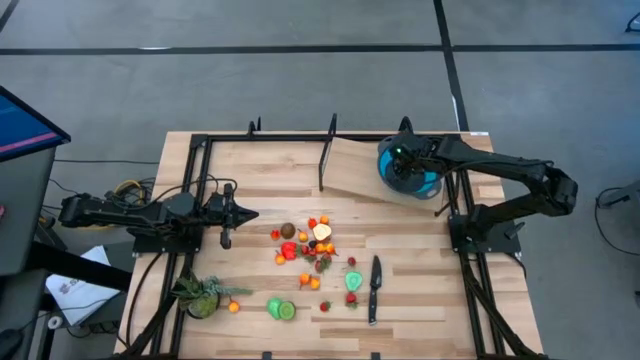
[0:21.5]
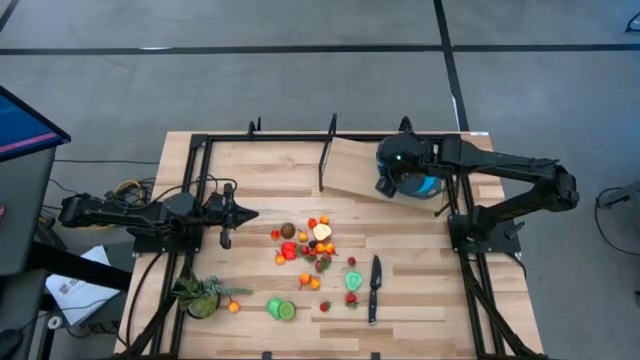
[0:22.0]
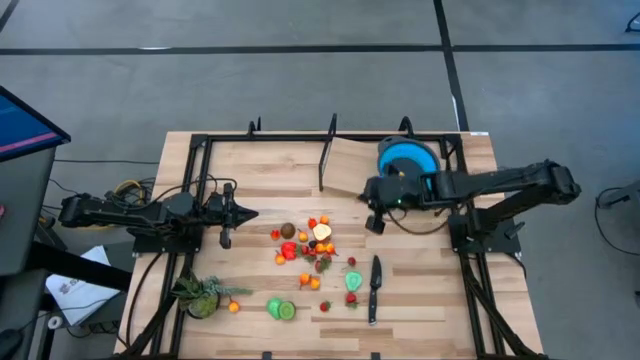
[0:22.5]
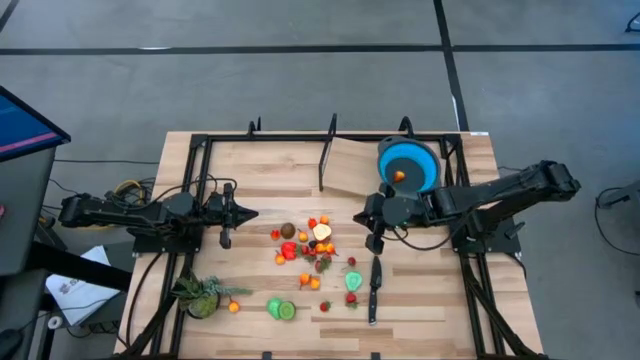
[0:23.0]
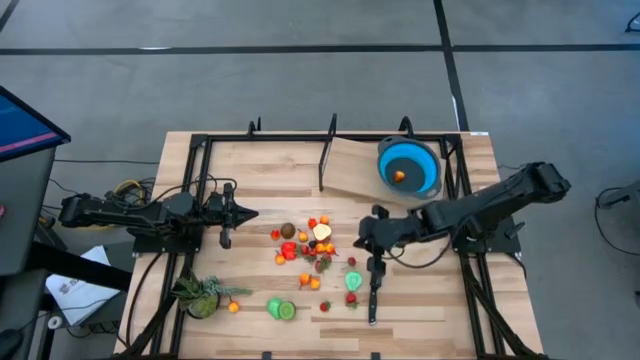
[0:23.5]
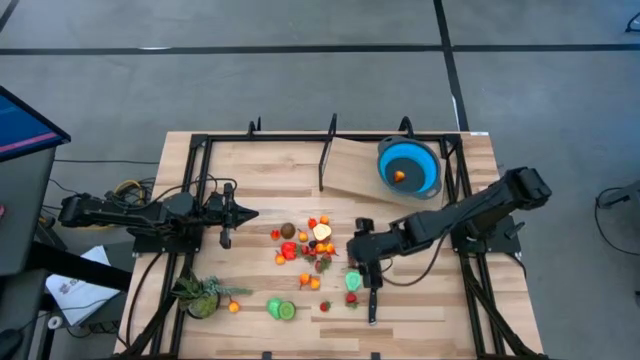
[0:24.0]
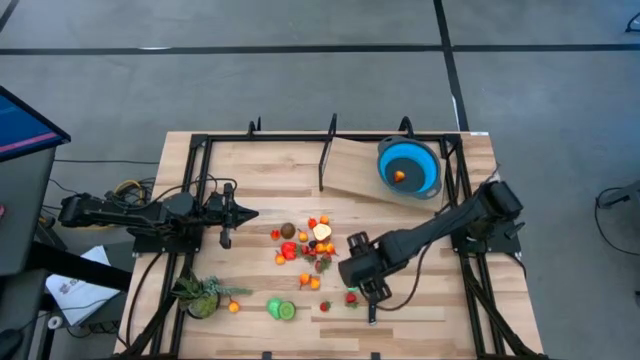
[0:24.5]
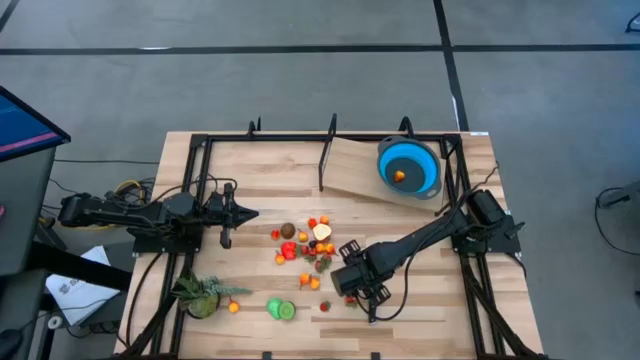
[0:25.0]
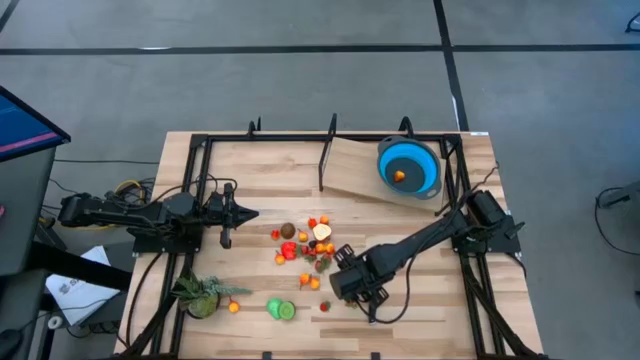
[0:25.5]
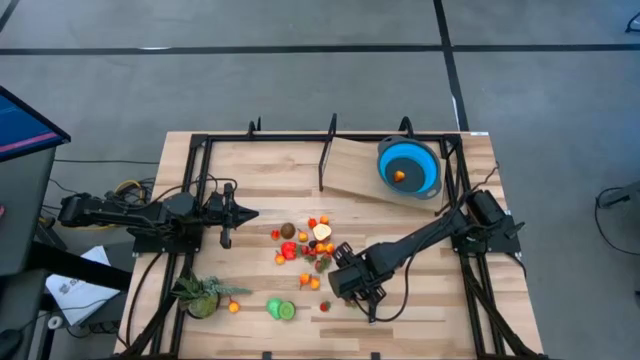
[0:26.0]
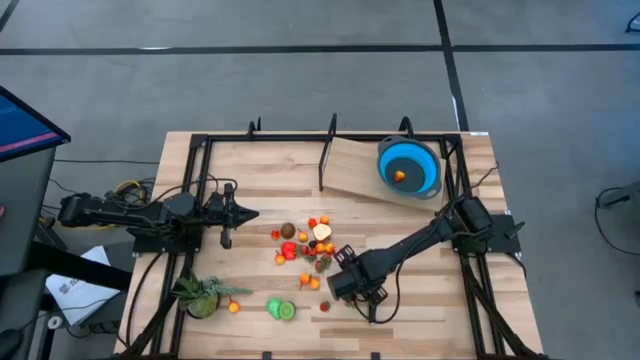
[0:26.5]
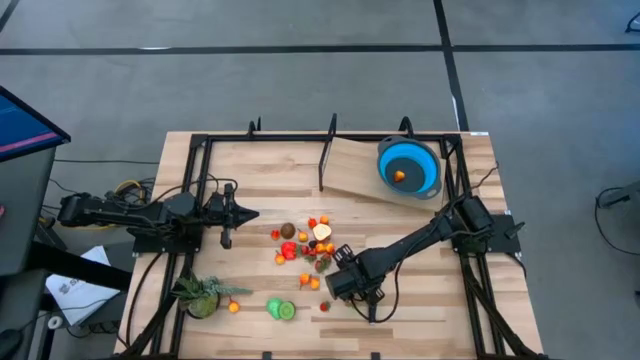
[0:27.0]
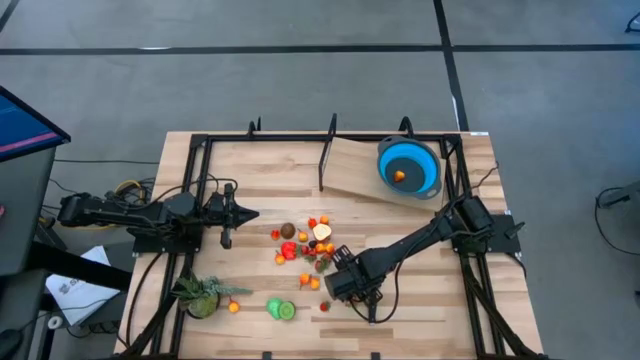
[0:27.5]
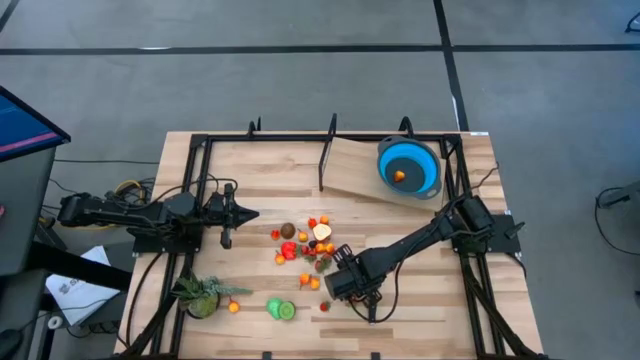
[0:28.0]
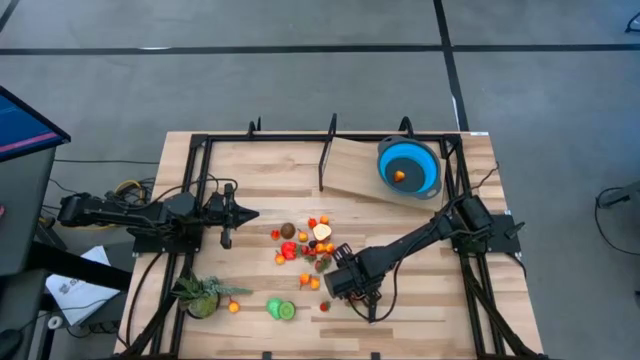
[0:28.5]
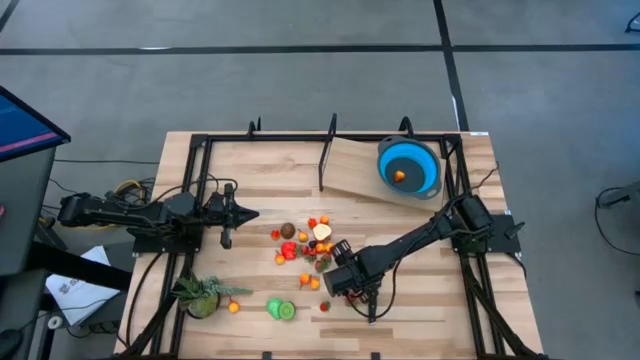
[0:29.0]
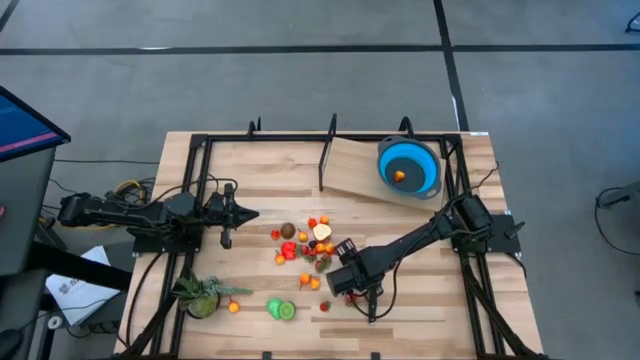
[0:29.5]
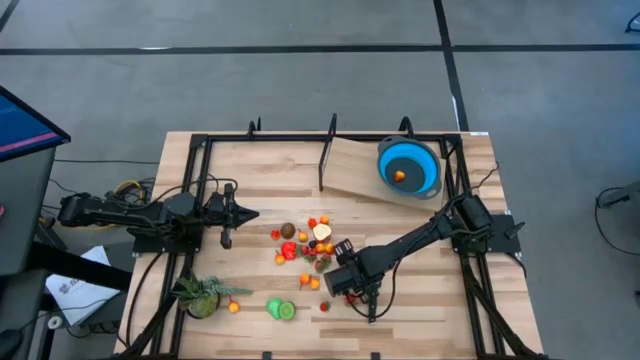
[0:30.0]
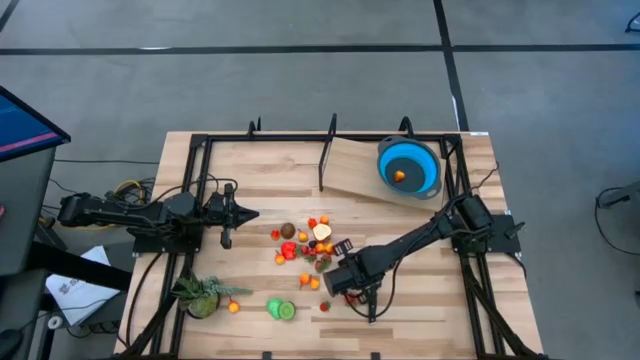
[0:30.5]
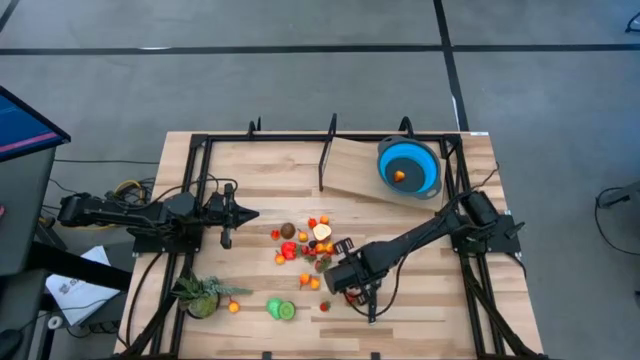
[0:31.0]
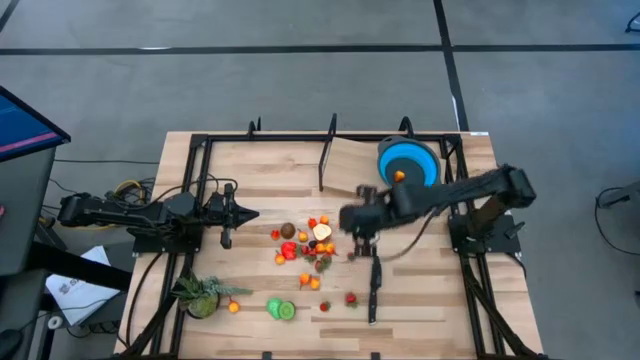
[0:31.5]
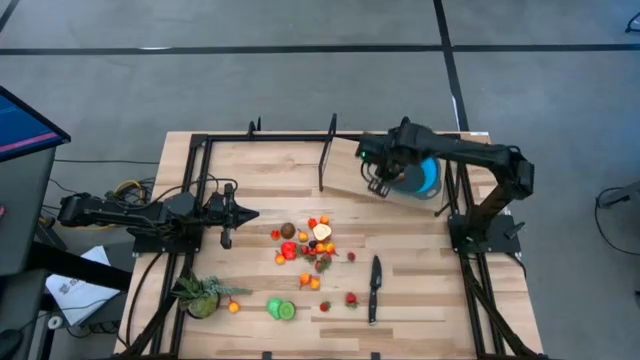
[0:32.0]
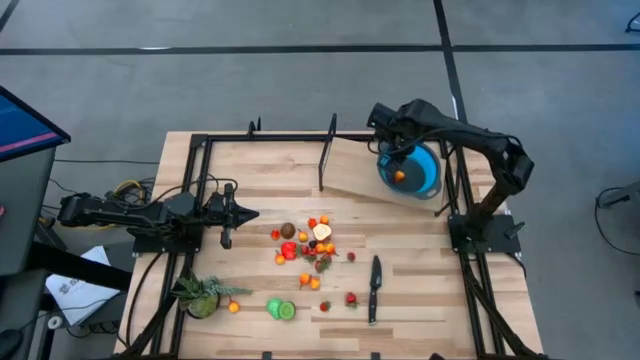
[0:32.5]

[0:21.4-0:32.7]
Task: Pick & Place Fruit
Put the half green pear into the blue colander

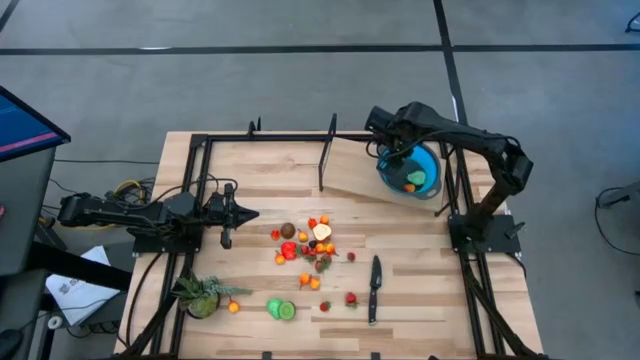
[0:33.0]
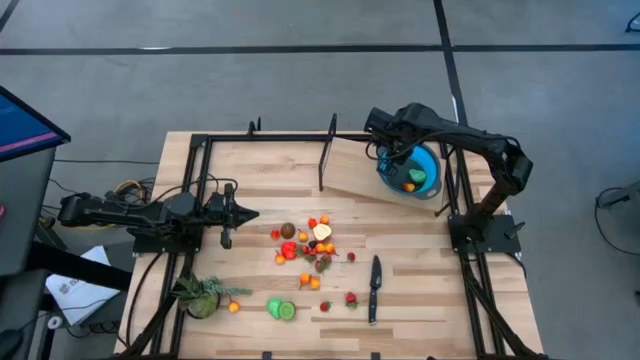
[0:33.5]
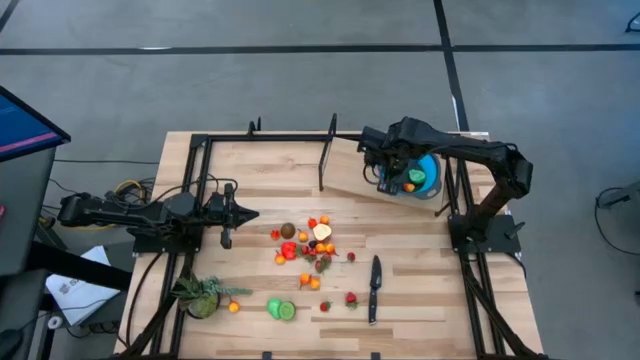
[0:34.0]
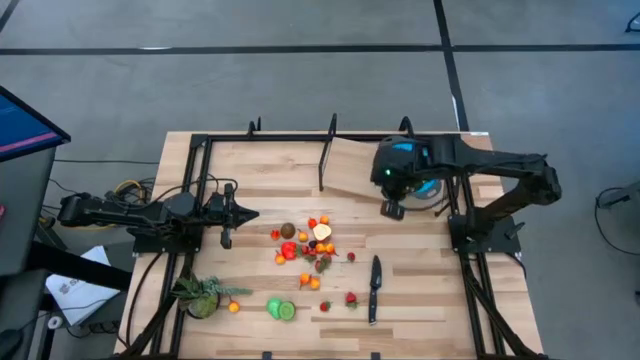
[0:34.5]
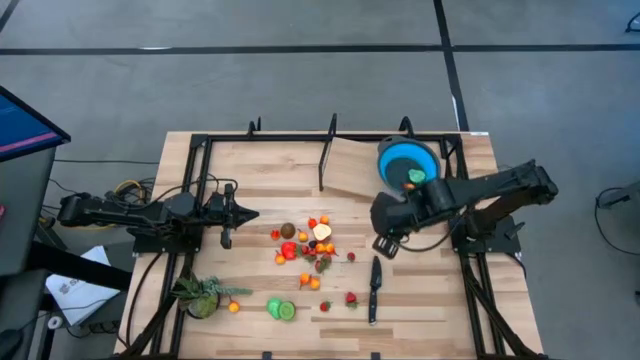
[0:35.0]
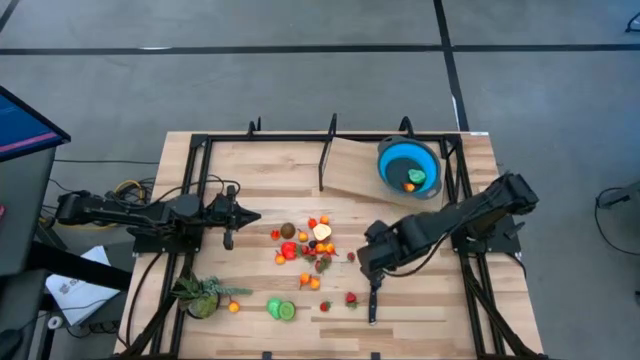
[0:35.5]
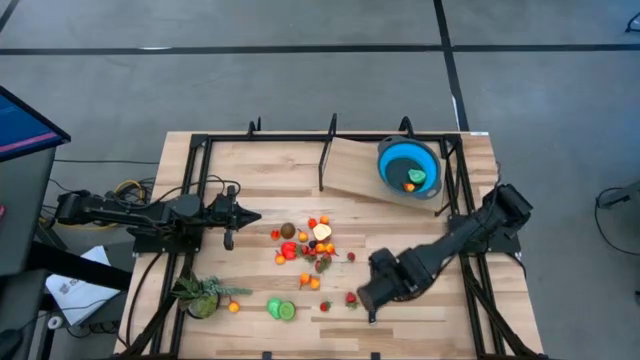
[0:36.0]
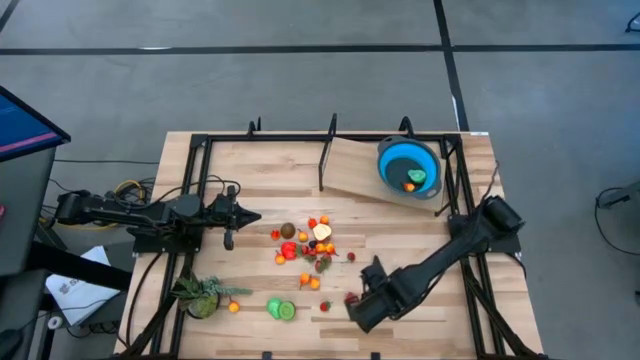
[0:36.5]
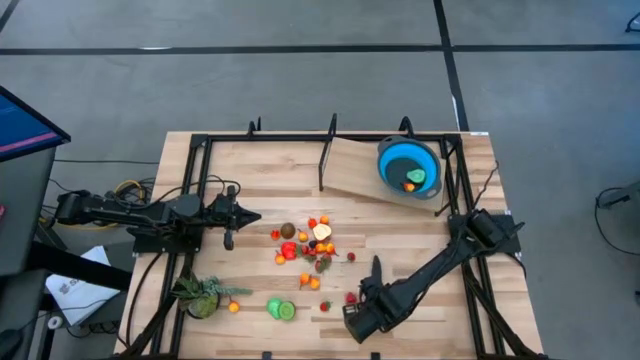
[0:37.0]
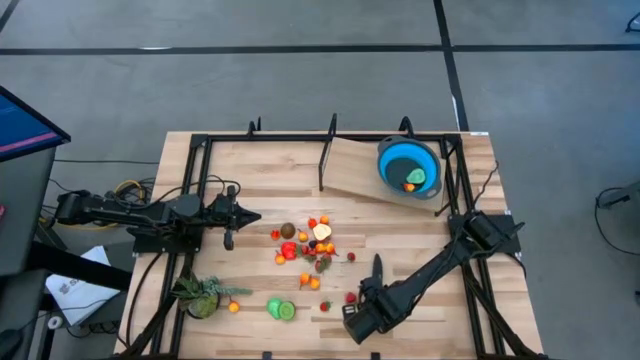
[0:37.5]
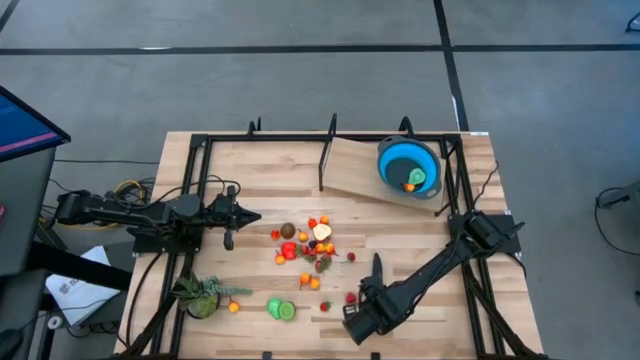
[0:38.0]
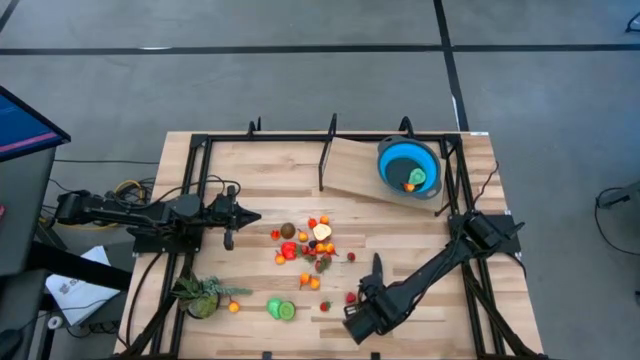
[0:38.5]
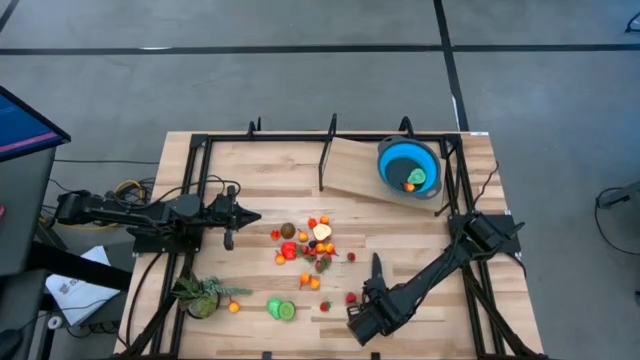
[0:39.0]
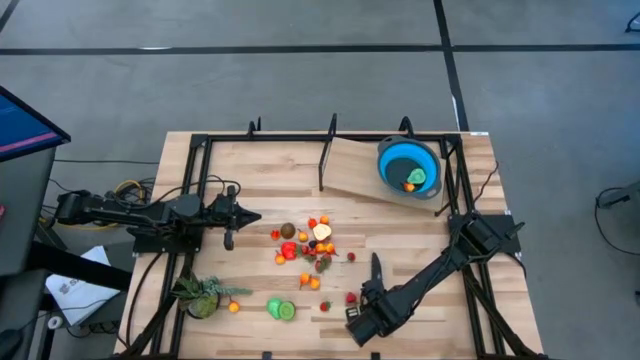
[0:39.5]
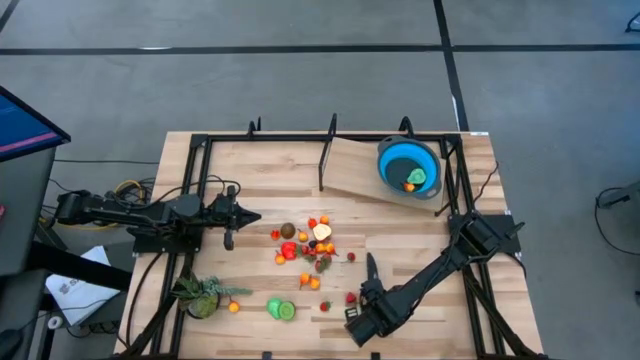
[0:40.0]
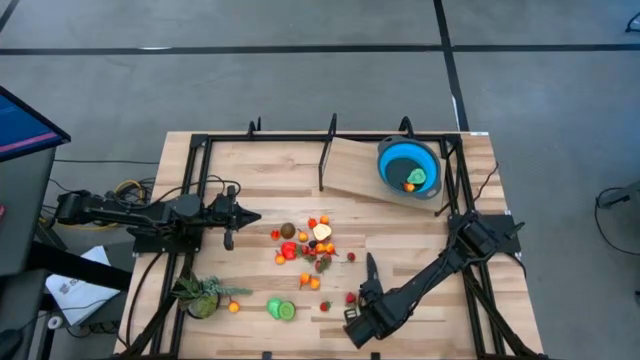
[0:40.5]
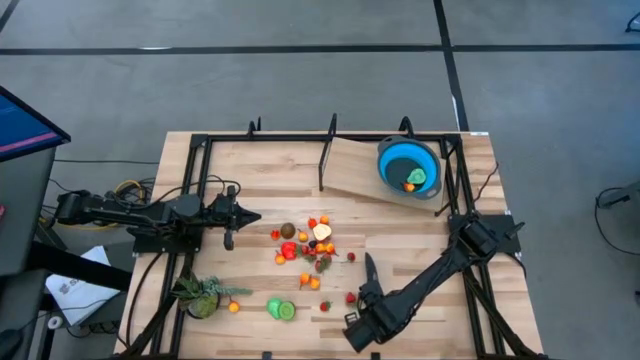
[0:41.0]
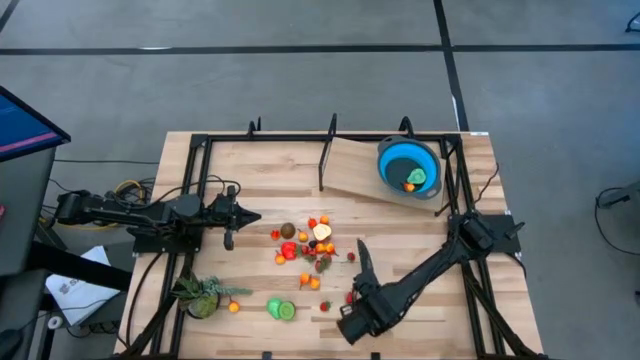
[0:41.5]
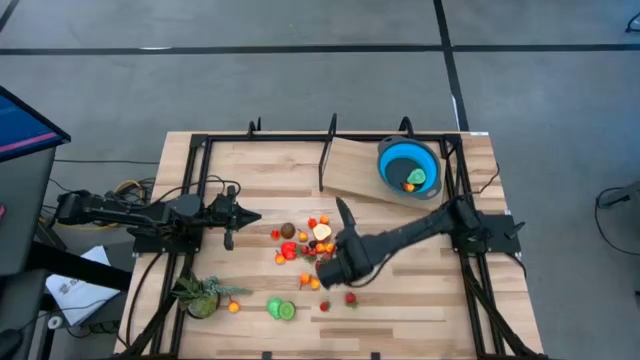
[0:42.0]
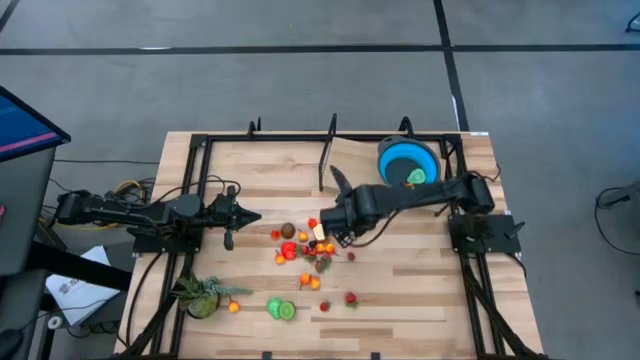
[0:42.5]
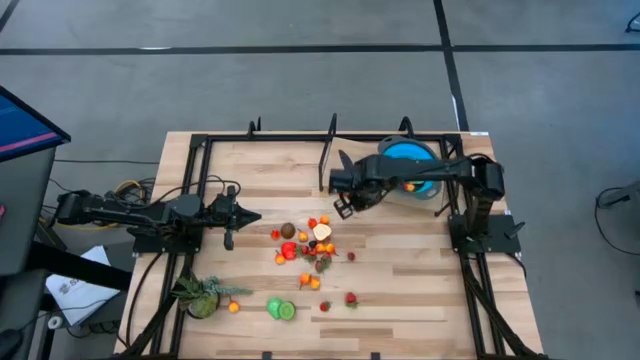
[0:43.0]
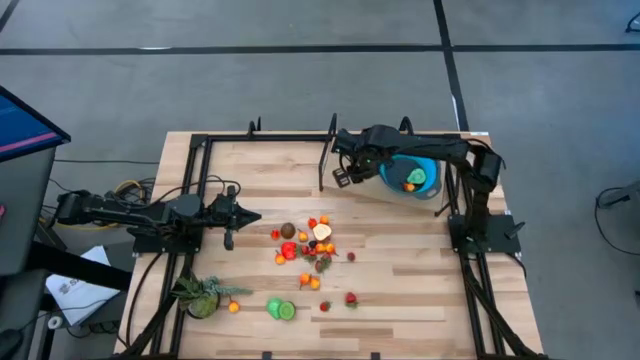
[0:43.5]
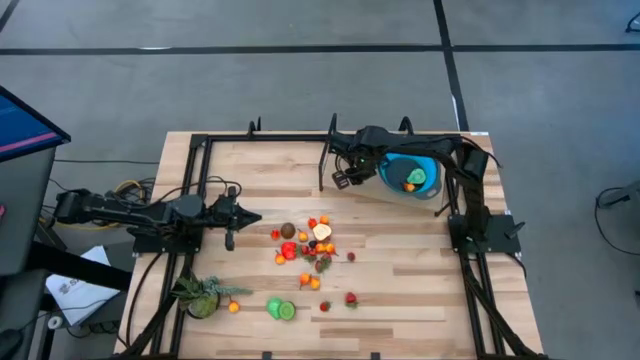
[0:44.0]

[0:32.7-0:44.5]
Put the black kitchen knife on the shelf
